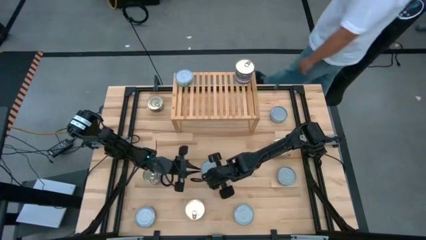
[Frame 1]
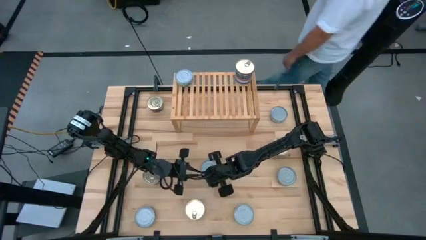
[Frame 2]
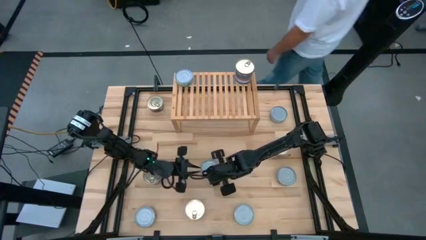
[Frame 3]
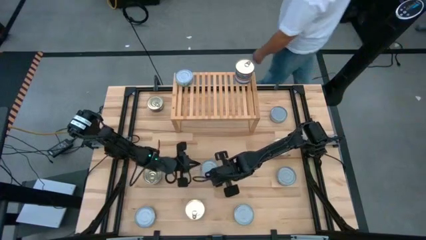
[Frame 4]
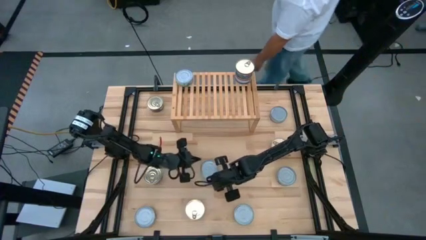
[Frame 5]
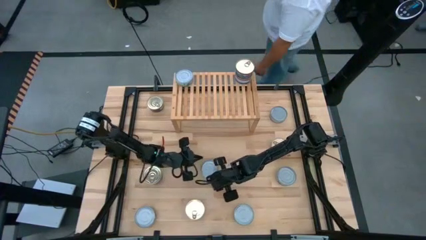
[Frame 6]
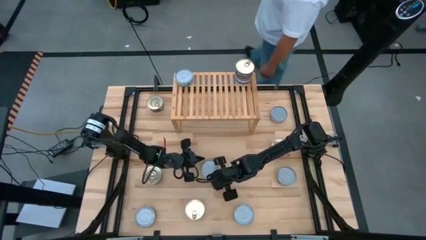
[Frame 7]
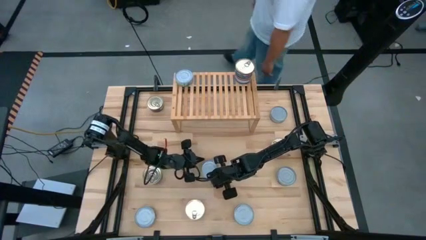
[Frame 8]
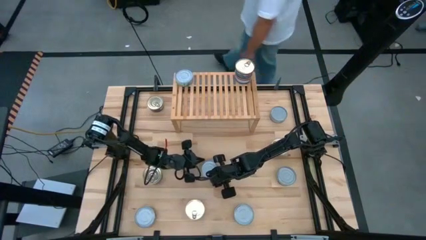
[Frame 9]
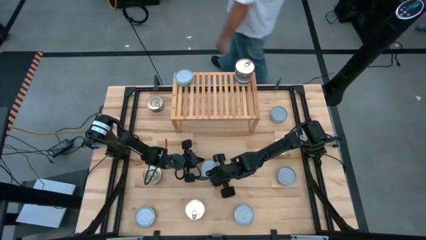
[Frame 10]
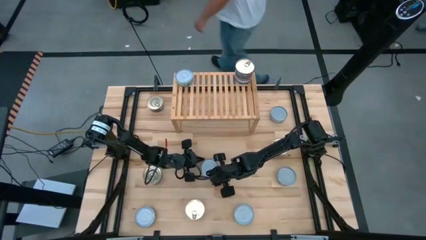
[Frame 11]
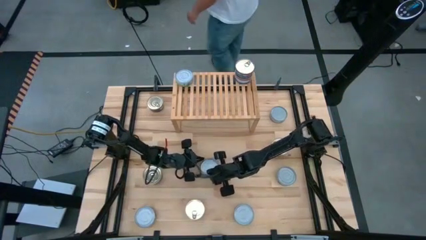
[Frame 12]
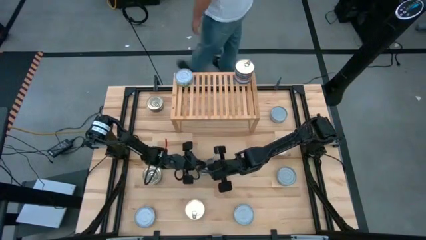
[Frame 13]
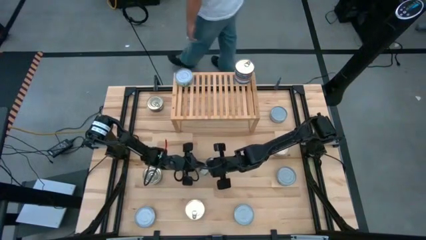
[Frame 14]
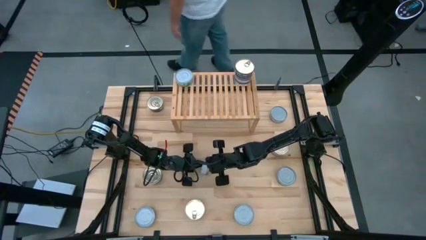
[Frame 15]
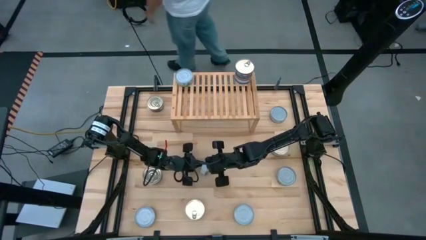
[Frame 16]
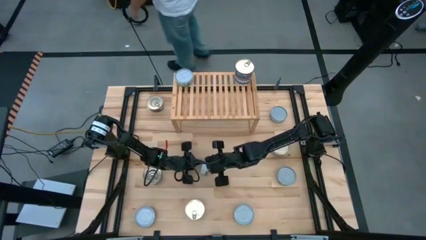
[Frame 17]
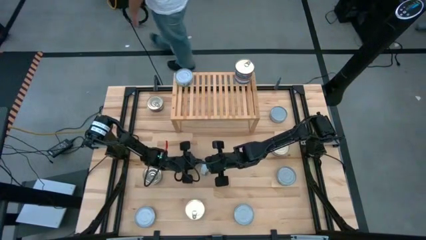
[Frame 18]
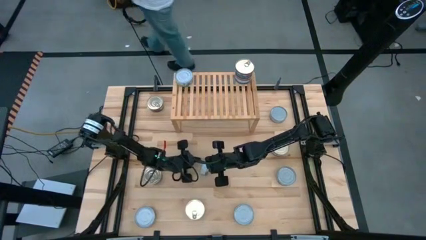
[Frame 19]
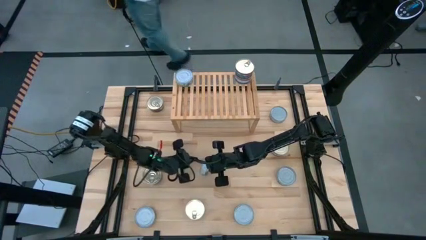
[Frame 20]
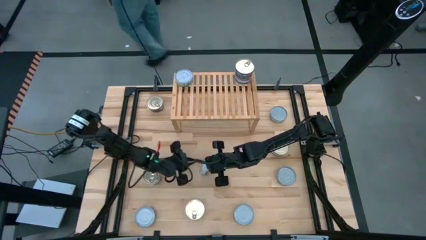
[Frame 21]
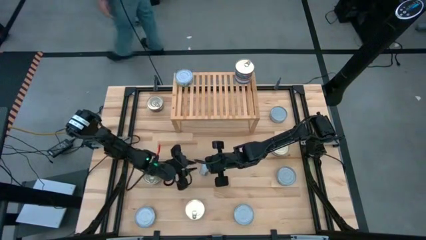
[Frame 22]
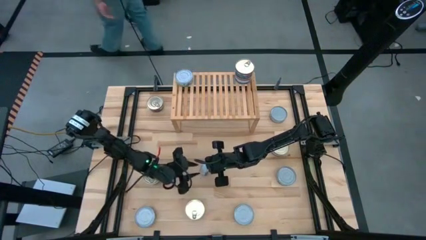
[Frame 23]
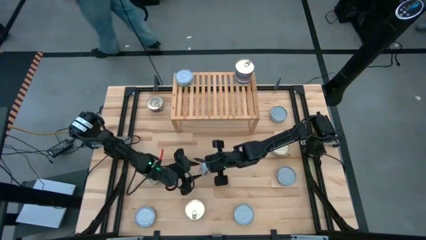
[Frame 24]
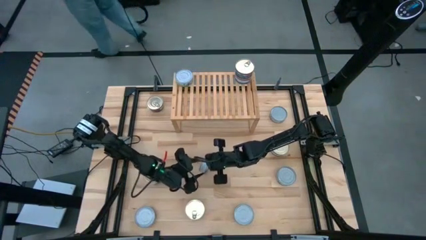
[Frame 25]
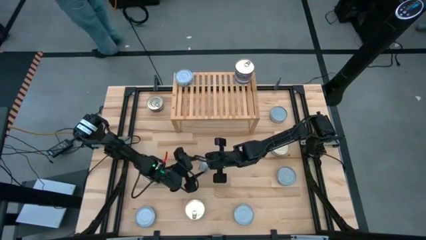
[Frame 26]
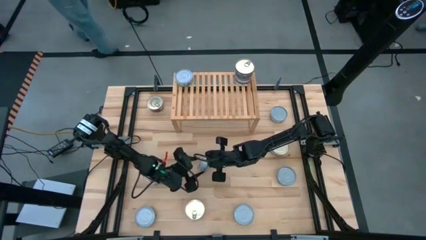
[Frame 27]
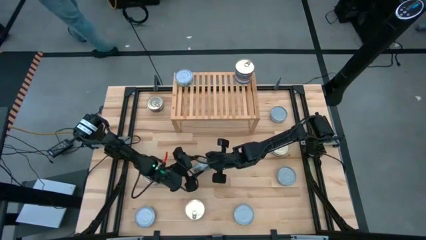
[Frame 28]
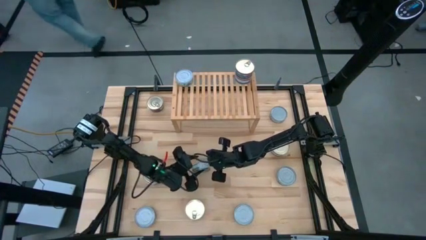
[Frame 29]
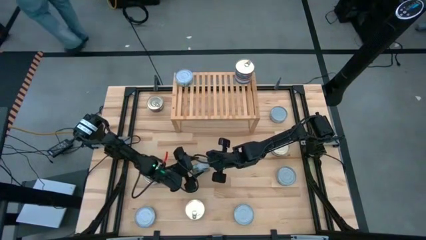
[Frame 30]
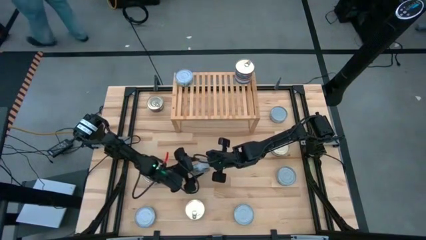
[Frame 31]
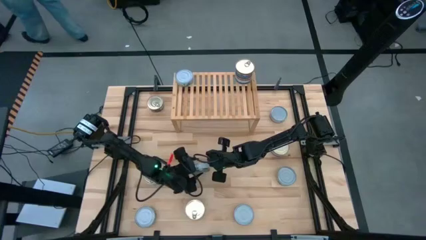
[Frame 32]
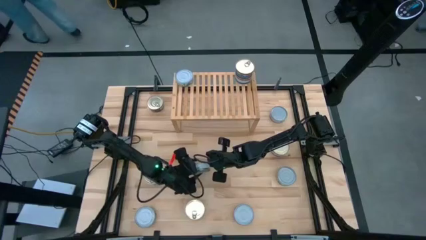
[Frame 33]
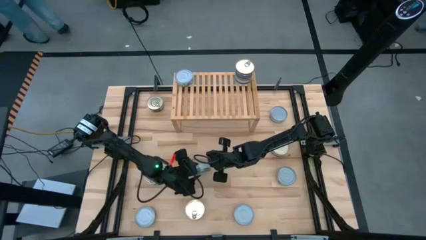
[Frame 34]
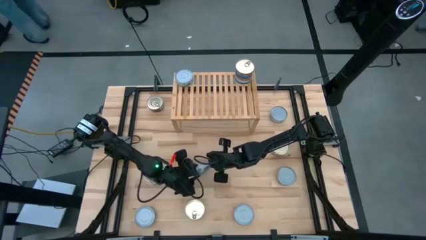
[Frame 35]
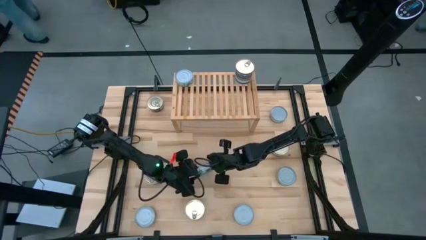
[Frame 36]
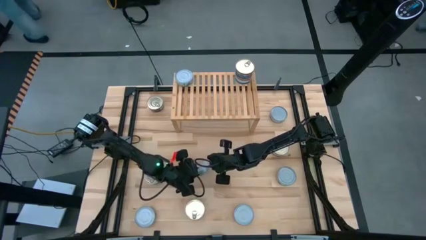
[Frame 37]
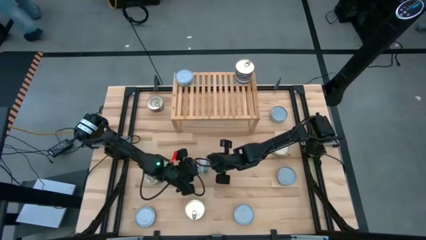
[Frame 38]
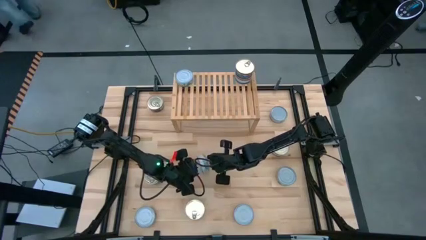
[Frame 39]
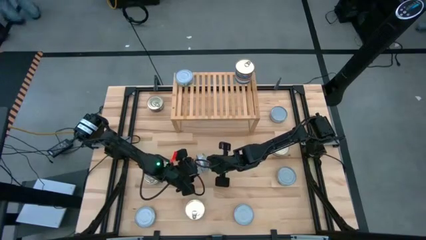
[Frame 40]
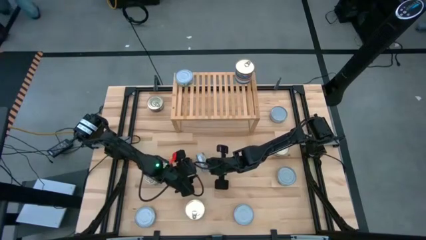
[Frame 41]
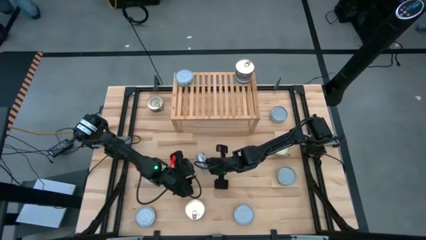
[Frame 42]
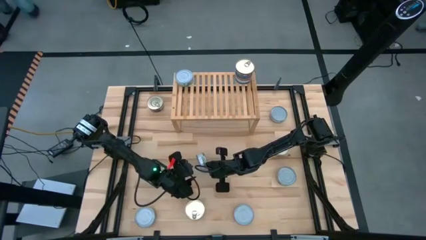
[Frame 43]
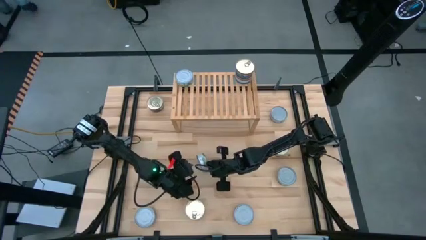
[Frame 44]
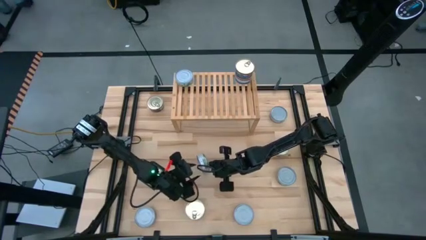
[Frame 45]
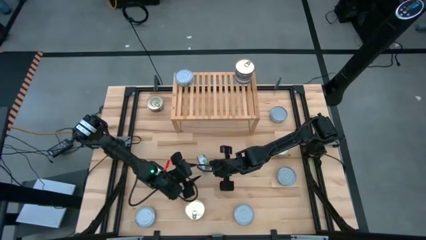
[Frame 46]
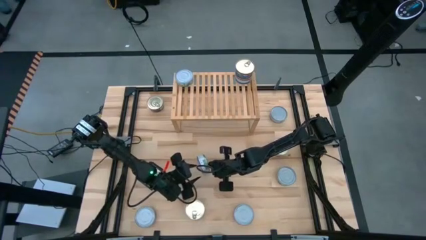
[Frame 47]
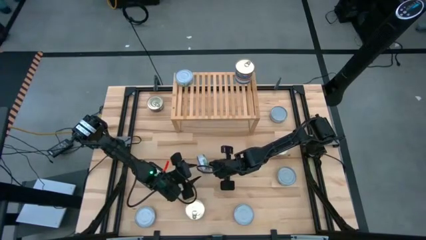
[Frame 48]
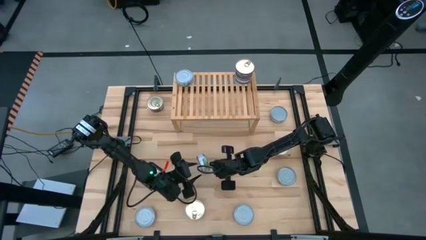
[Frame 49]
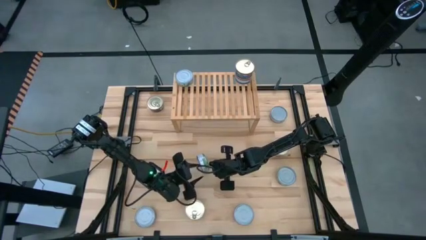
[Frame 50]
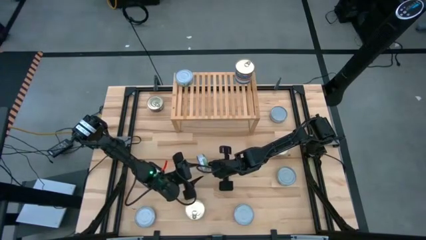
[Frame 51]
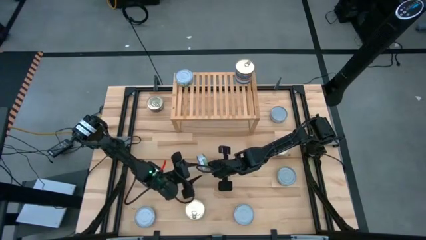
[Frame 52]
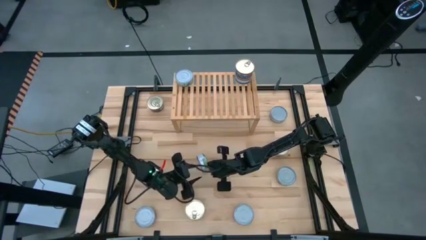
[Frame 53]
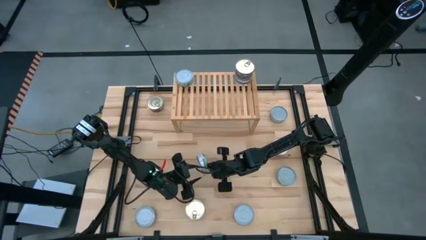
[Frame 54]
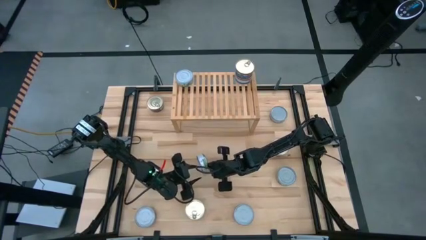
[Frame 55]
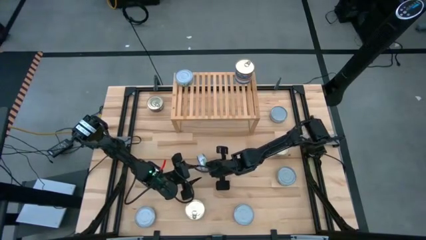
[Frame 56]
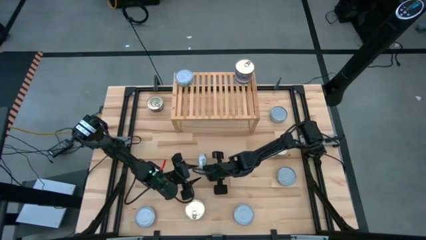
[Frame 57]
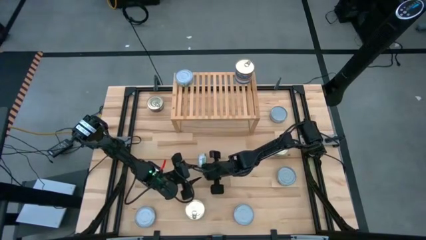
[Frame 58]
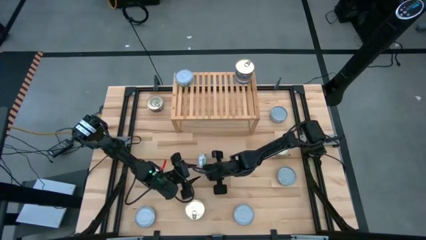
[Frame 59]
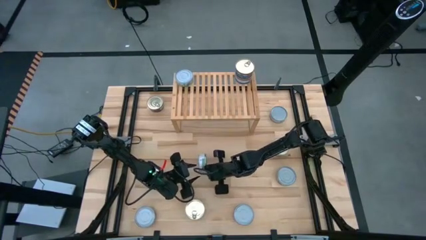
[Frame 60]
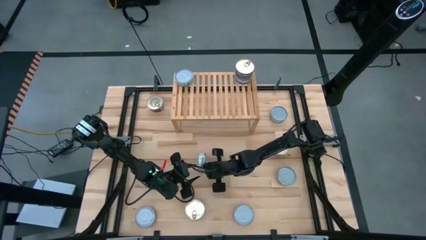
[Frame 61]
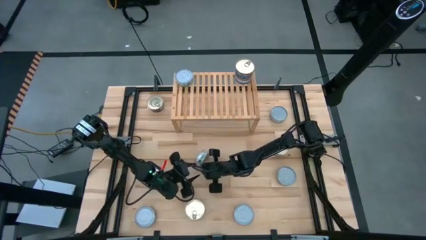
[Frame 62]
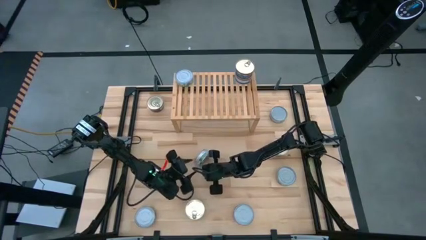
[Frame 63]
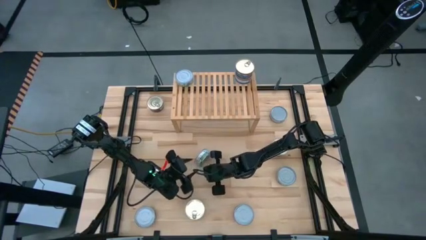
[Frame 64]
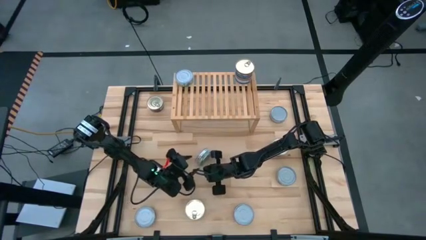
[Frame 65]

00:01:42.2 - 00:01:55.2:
Task: Stack canned seafood by type on shelf
Stack the green tuna can on top of the other green tuna can on the shelf

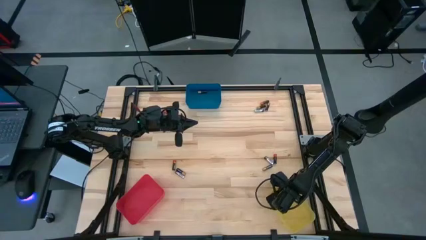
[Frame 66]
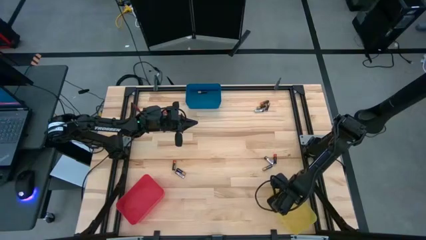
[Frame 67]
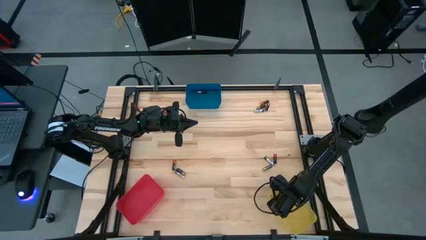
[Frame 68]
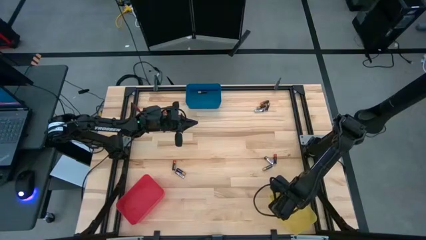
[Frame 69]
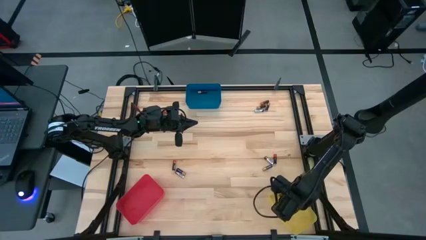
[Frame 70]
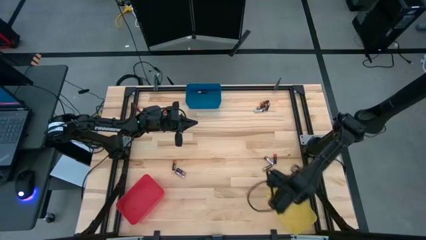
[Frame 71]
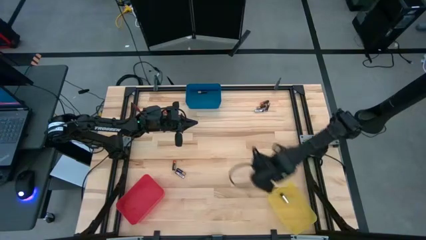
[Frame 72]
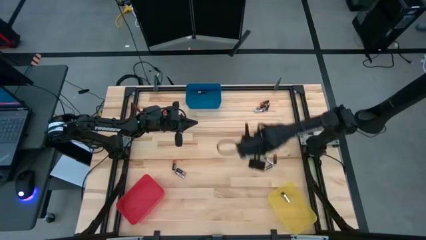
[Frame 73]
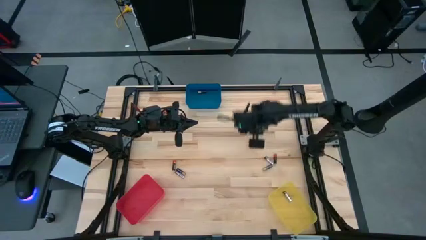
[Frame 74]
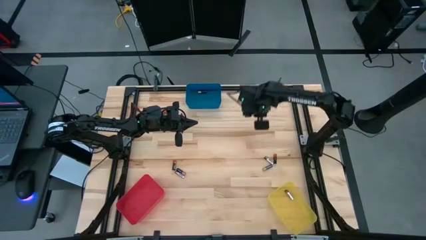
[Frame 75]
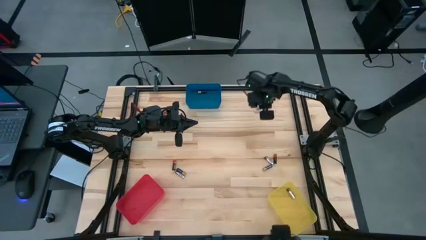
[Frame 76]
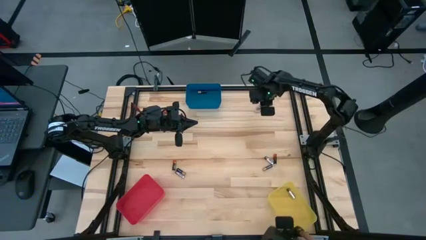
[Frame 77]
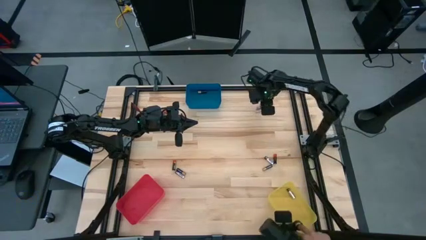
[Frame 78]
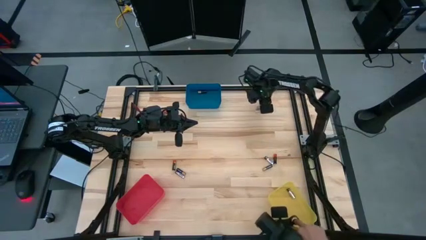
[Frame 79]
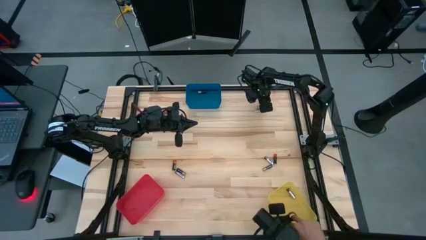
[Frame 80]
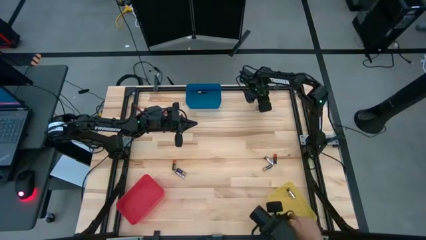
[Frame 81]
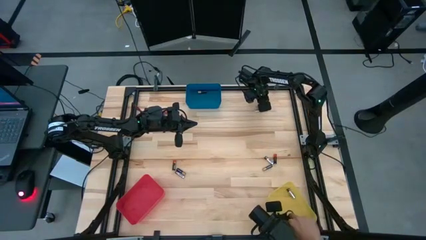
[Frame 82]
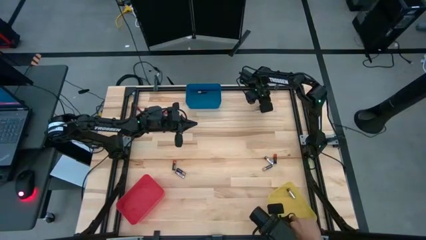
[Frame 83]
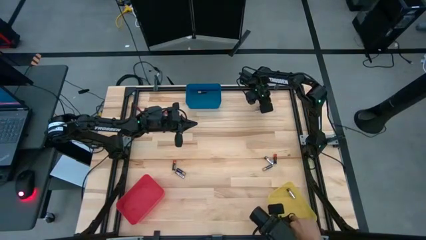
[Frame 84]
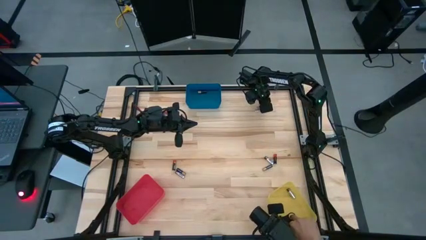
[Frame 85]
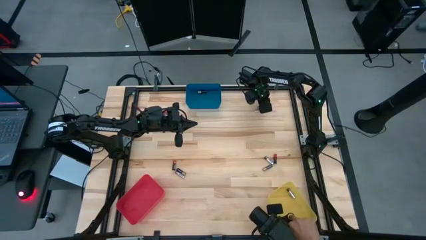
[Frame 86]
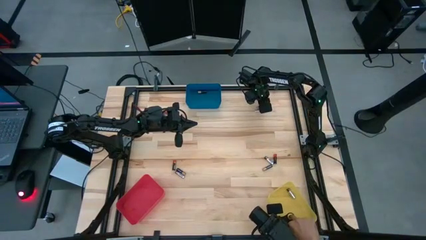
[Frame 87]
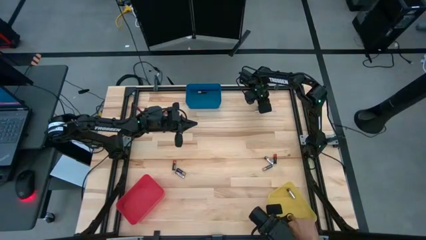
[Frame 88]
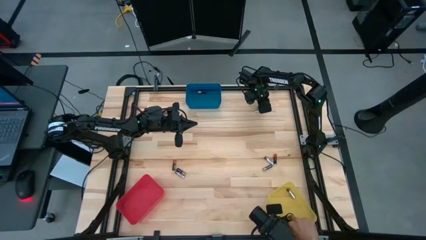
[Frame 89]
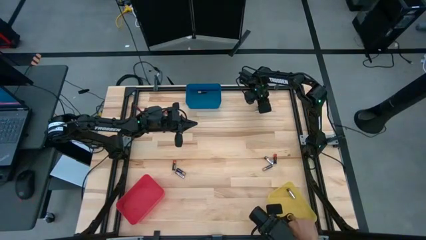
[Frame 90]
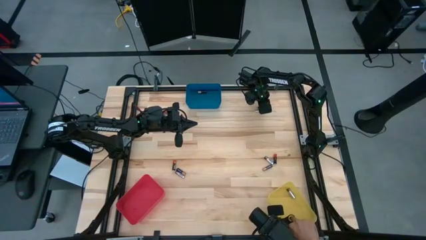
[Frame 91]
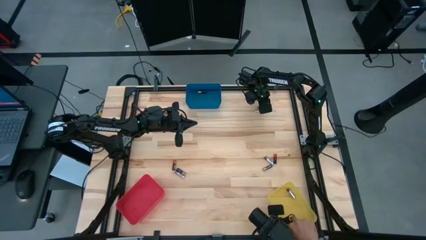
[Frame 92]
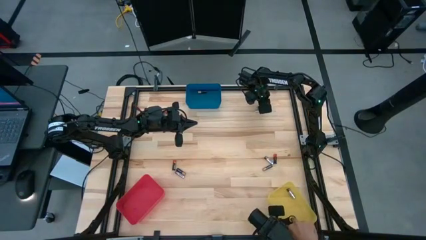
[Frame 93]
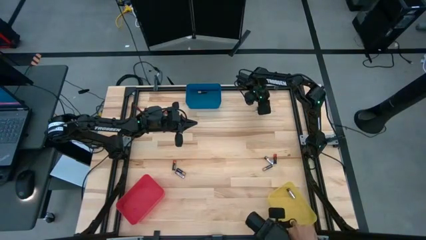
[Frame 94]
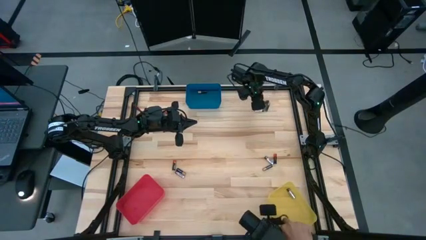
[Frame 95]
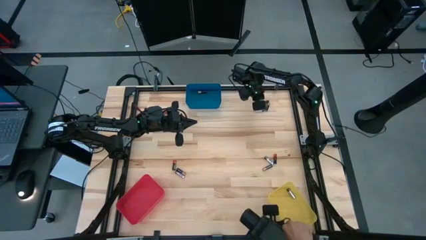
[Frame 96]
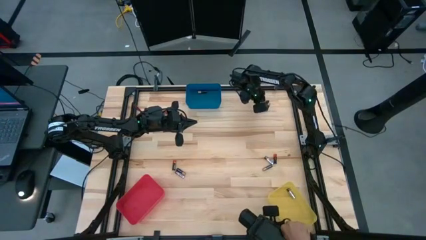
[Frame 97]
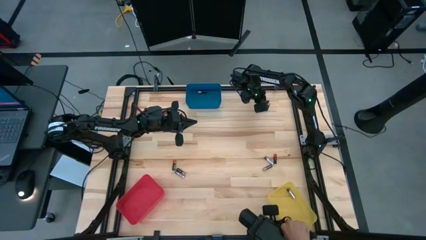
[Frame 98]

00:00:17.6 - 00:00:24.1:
Task: Sort batteries
Put the black-red battery into the red bin
